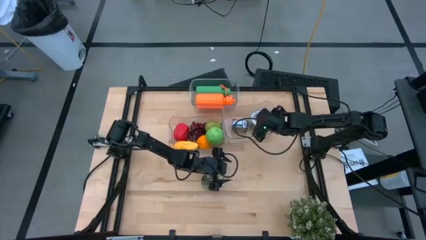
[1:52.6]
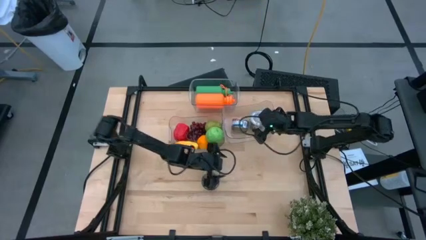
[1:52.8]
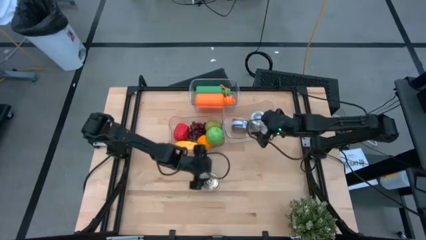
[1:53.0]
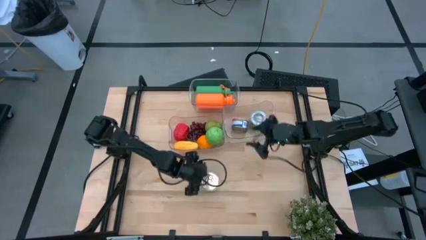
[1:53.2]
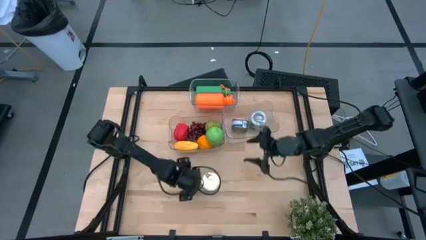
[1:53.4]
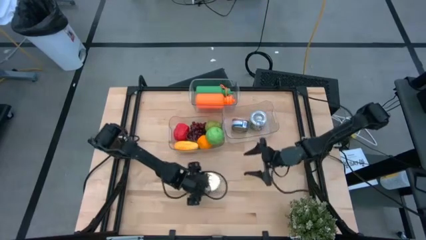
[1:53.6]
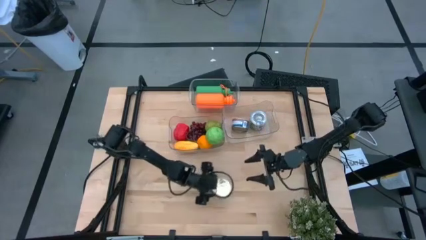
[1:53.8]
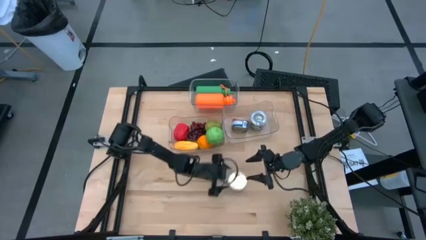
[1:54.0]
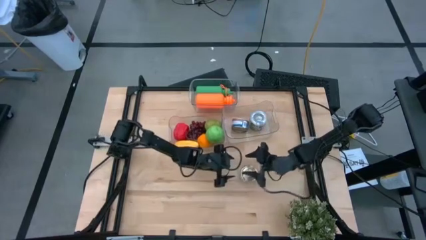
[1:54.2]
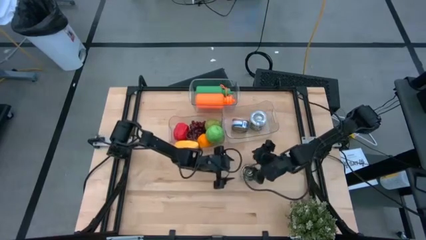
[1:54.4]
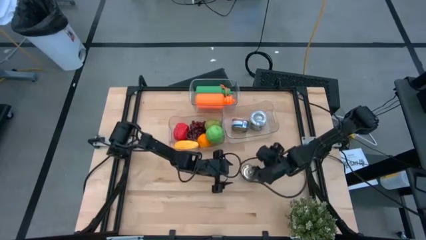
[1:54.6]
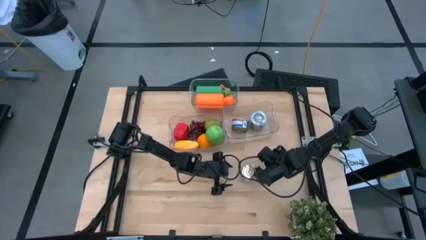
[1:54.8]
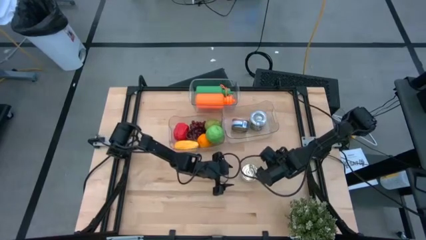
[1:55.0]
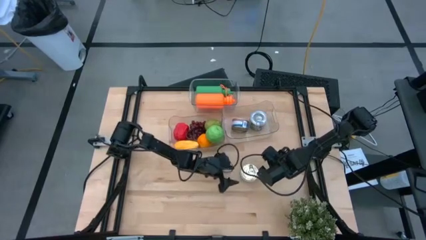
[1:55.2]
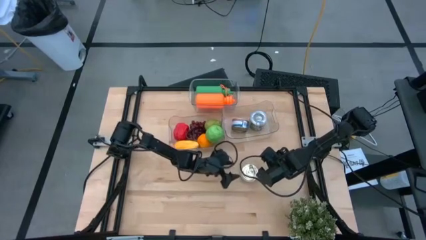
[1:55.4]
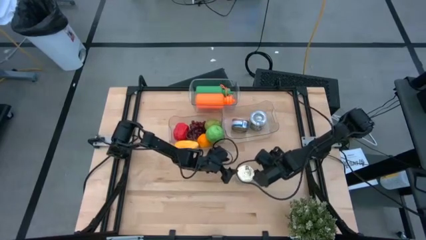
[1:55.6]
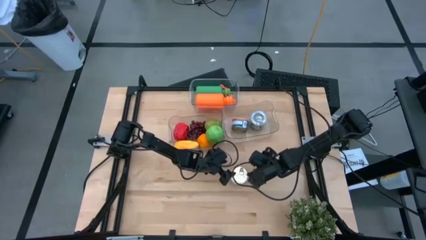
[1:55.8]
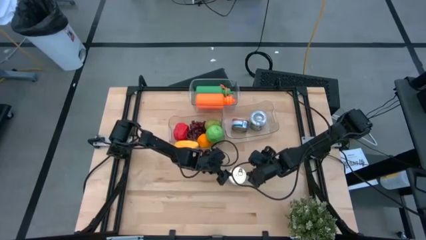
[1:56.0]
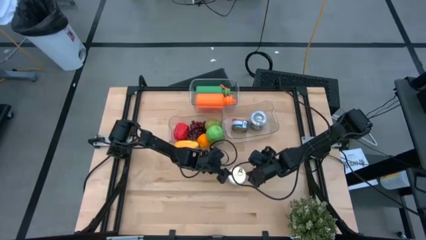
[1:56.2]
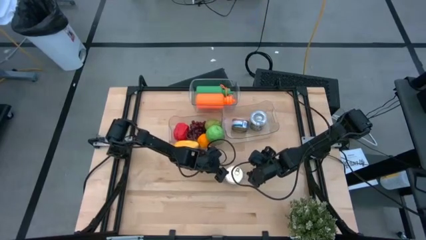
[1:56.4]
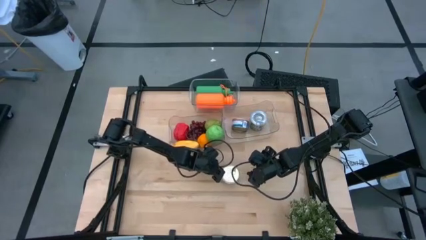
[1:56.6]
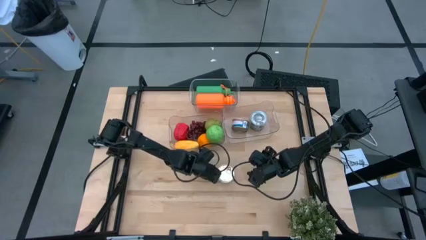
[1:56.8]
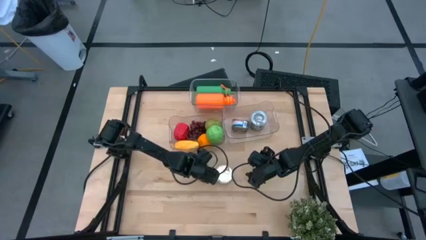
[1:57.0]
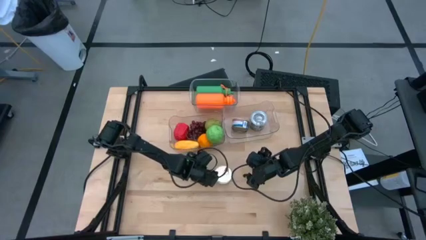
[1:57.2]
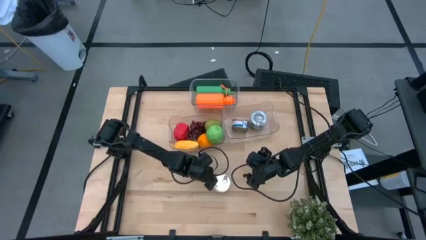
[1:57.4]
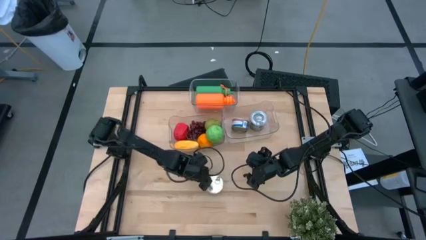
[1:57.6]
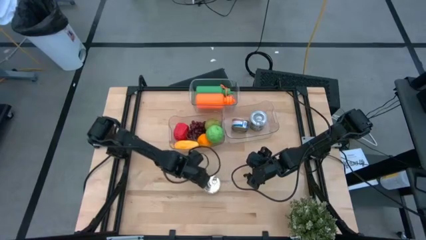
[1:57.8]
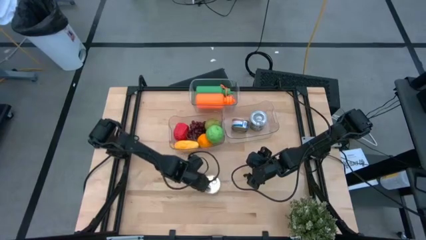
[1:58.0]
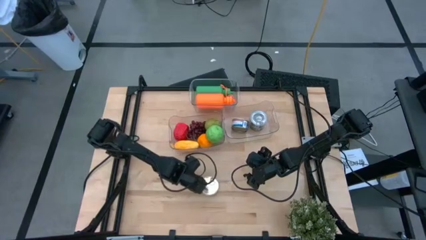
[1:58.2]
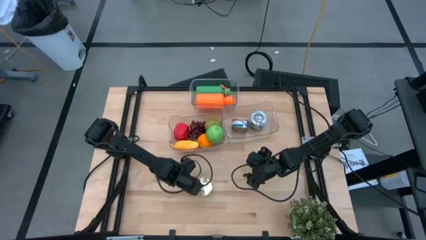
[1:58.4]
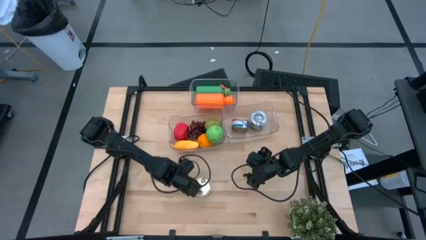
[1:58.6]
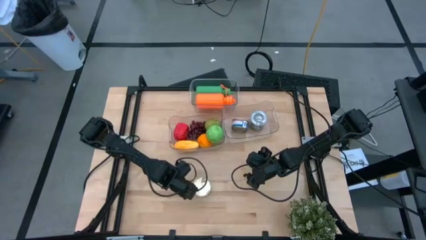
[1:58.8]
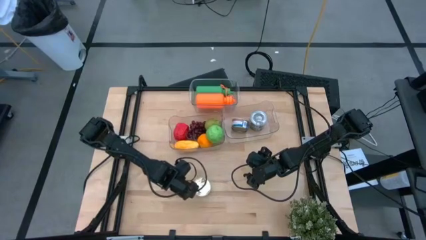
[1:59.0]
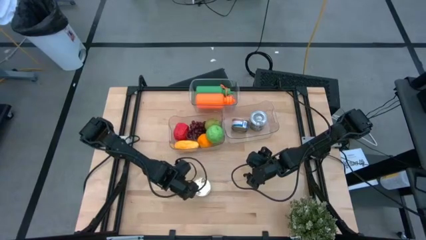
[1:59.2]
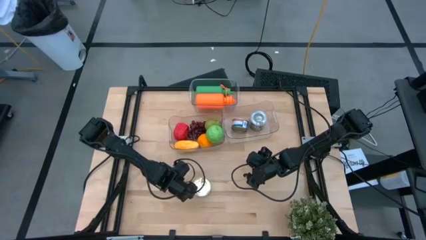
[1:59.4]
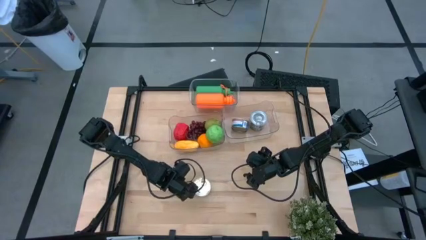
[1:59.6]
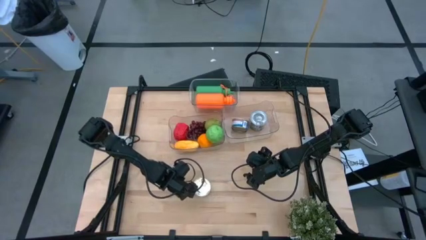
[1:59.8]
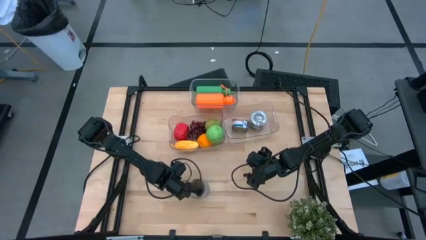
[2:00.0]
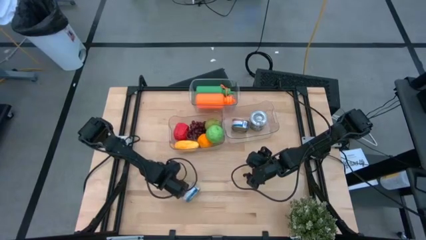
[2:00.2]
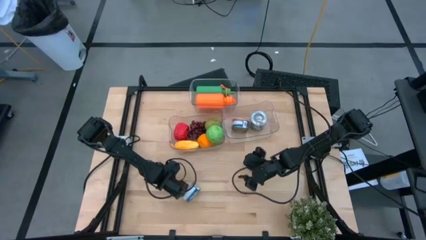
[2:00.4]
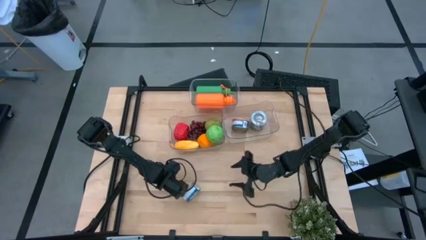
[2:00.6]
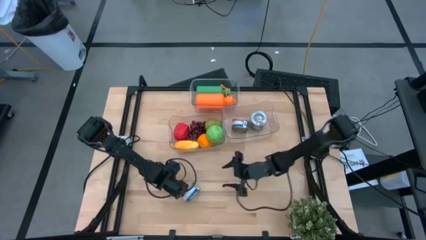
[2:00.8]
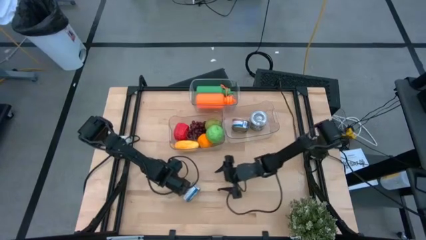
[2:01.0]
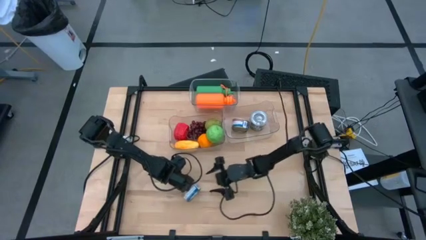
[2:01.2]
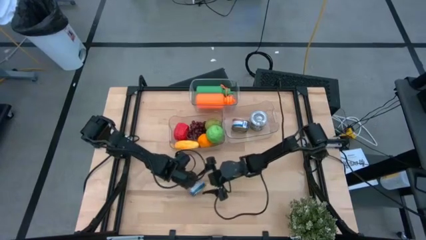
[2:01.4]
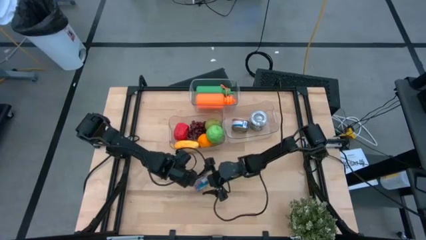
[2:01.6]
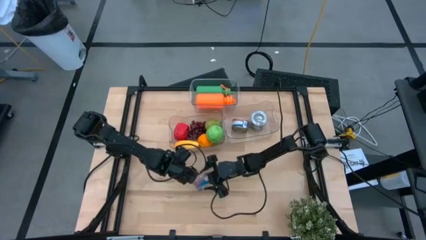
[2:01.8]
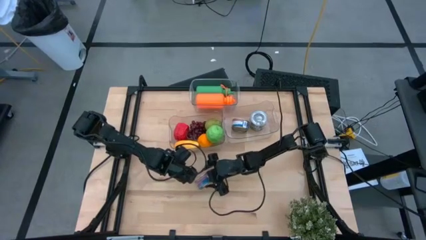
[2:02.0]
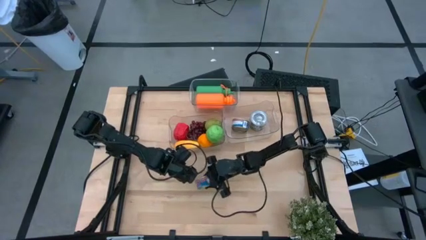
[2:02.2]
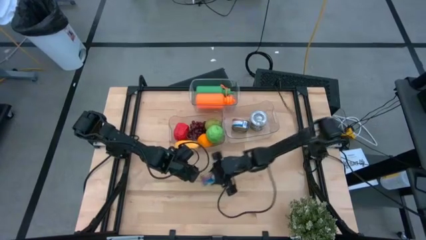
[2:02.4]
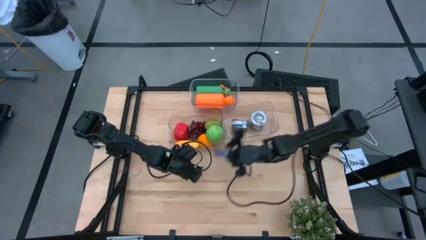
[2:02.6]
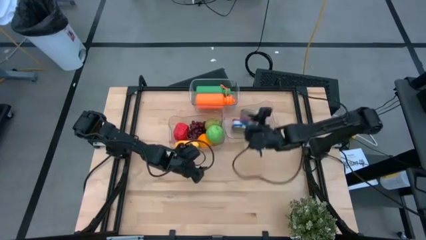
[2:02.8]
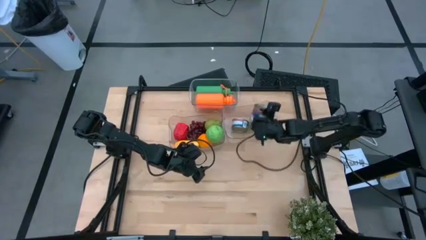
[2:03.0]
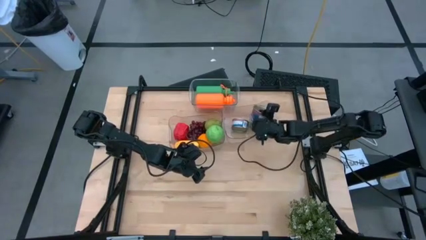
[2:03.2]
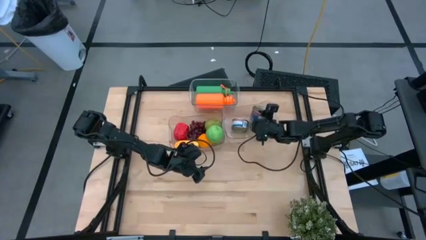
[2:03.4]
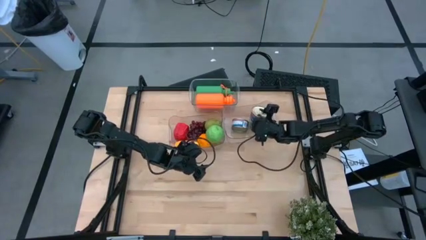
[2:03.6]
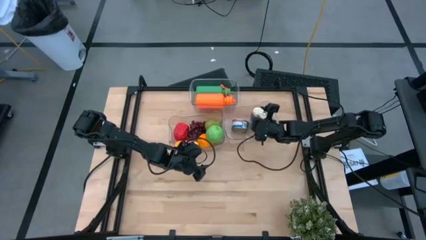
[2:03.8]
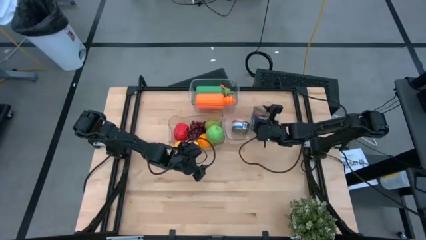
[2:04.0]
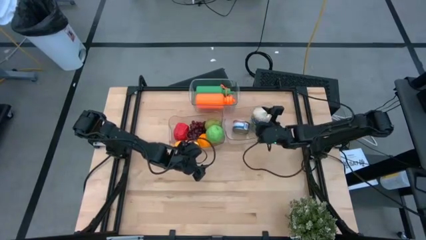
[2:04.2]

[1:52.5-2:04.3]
Task: Pick & Place Food Item
Put the blue and pink tuna can into the bottom right transparent bin

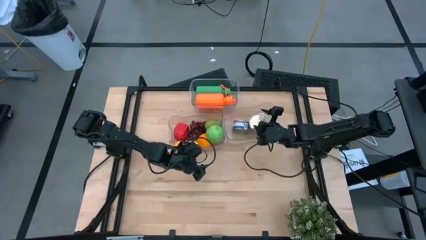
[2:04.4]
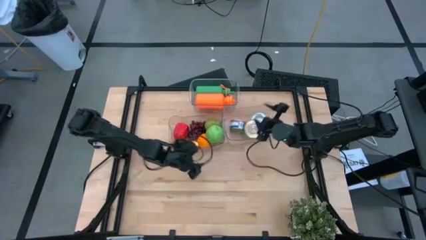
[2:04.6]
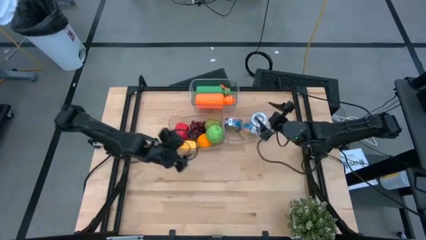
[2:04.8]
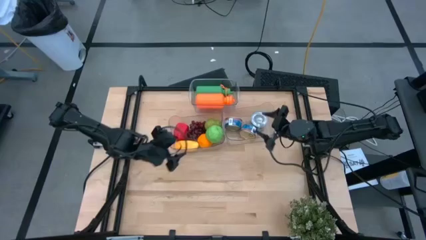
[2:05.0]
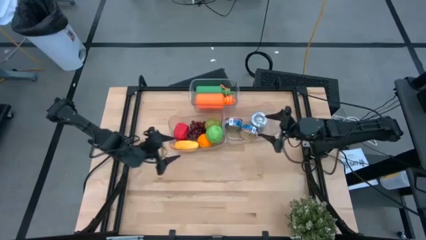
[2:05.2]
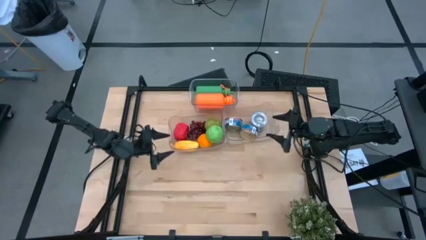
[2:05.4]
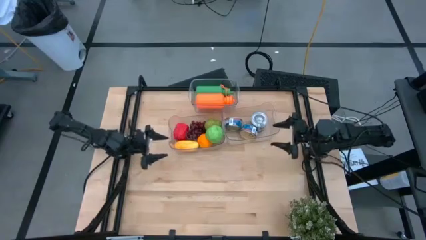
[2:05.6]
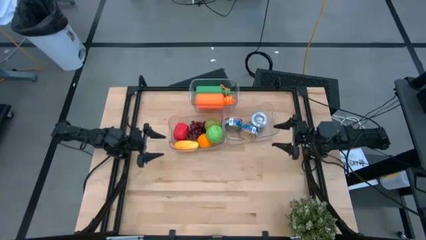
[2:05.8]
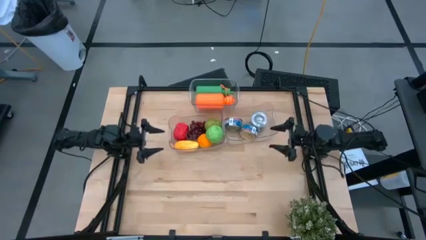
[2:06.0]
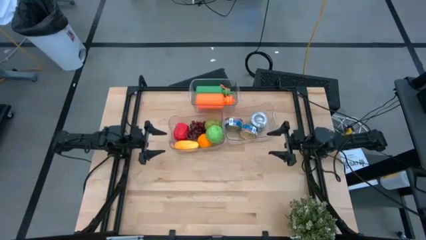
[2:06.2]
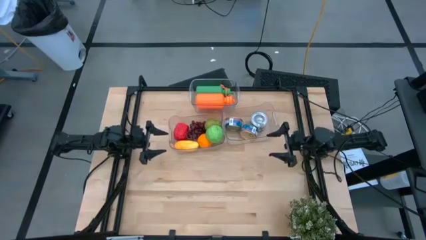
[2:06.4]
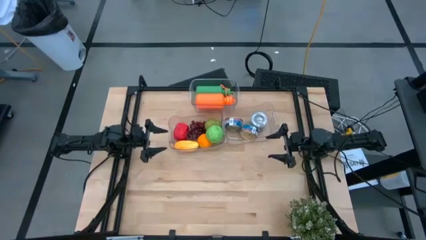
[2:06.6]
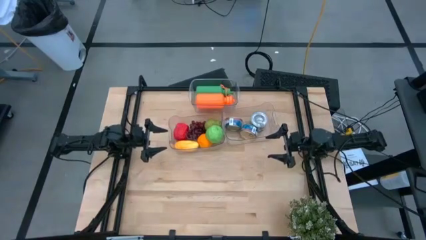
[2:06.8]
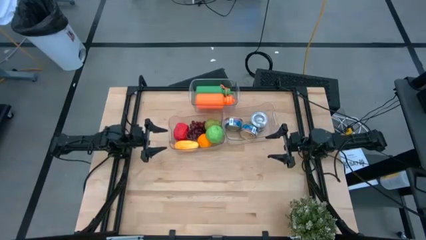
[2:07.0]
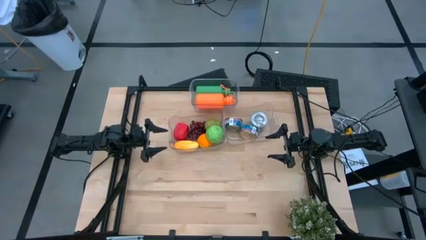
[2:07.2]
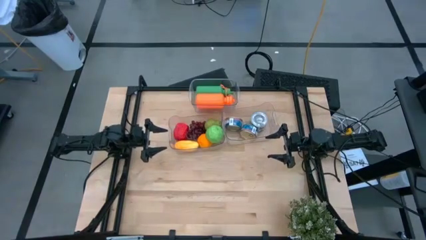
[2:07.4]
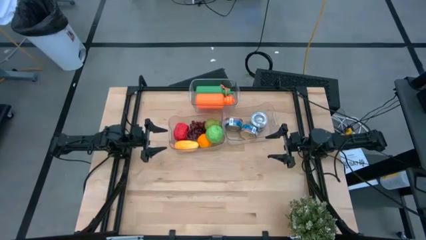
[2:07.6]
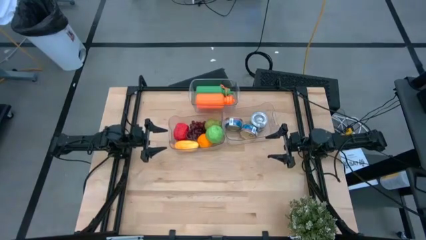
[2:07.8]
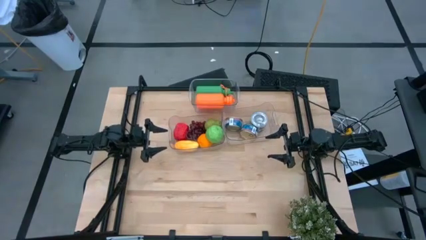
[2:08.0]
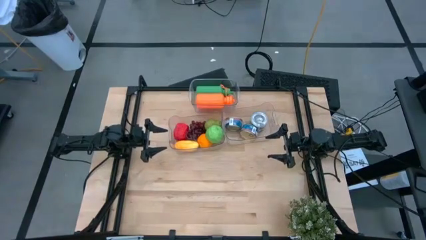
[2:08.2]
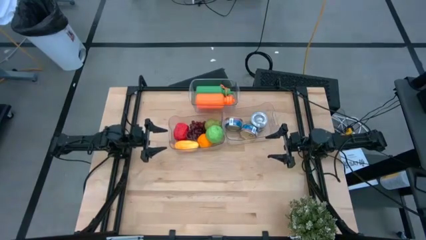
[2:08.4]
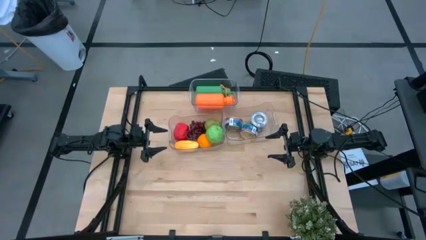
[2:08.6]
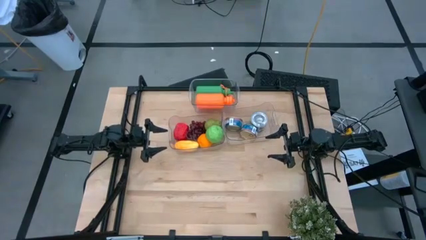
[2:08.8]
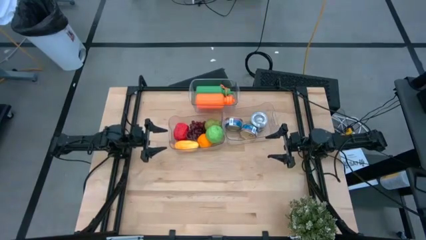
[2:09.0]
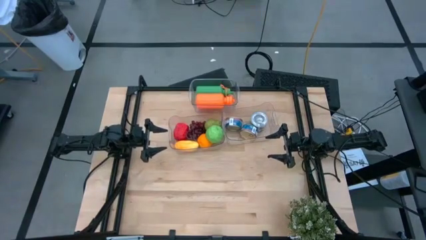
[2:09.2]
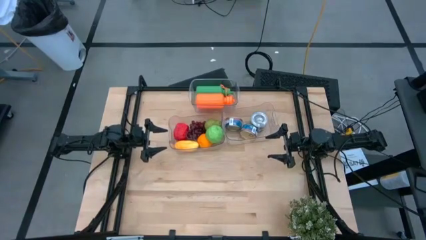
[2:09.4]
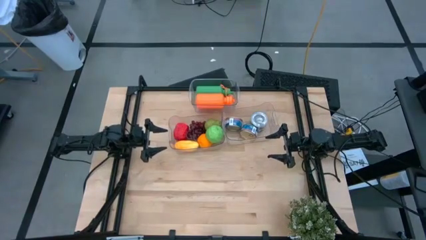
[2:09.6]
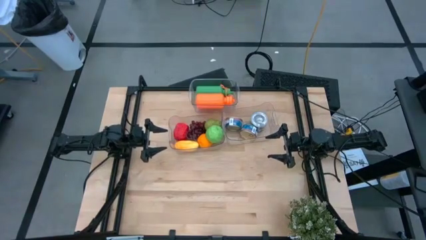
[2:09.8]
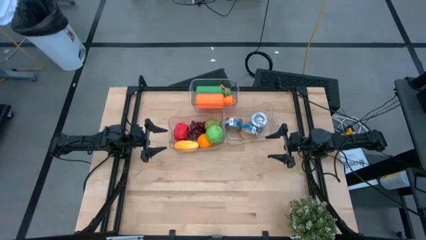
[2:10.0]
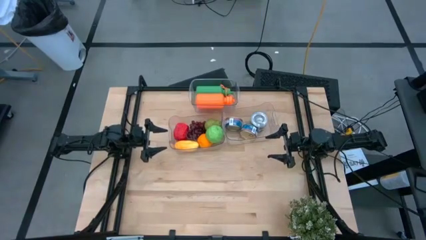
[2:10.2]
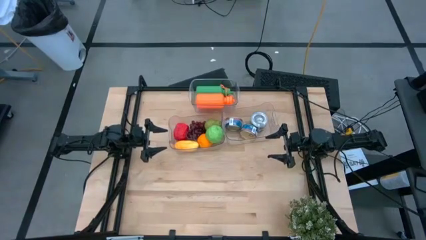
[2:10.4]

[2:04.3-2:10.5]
Return to Home Position
